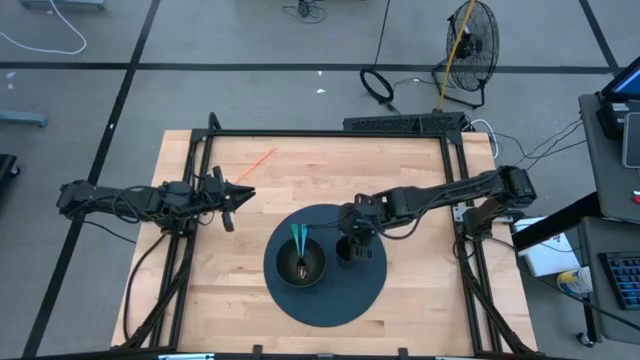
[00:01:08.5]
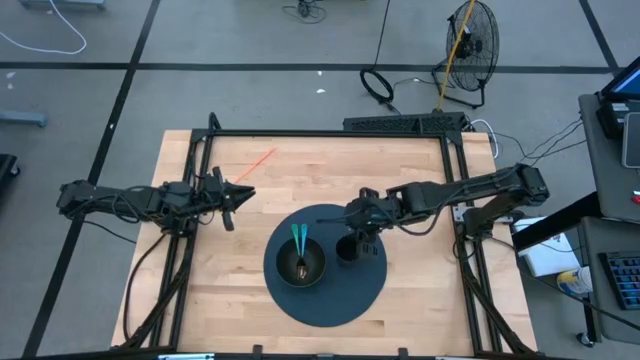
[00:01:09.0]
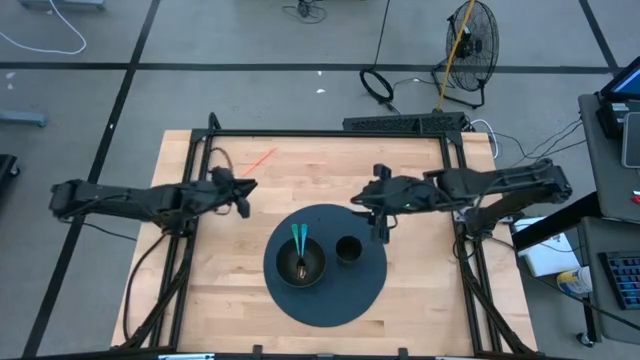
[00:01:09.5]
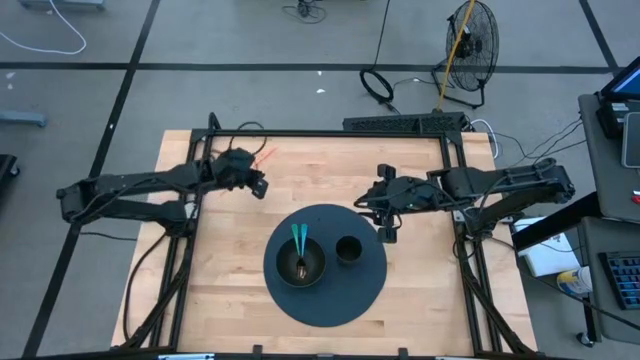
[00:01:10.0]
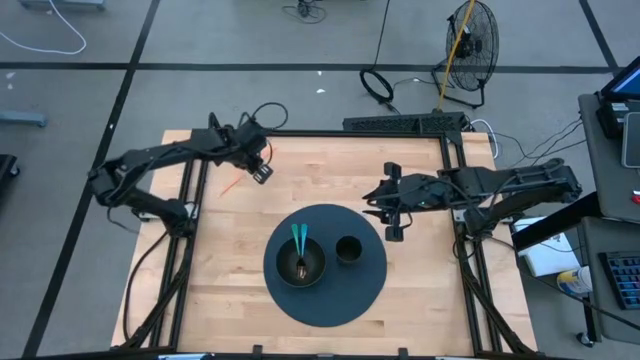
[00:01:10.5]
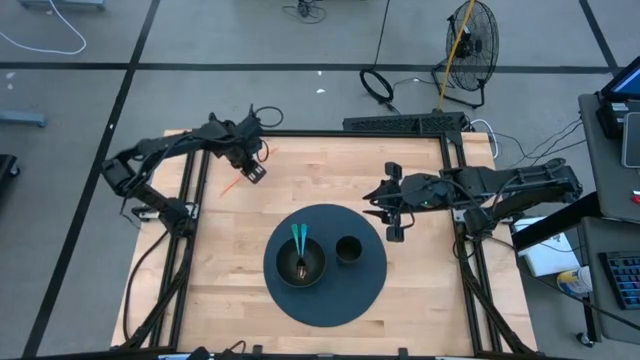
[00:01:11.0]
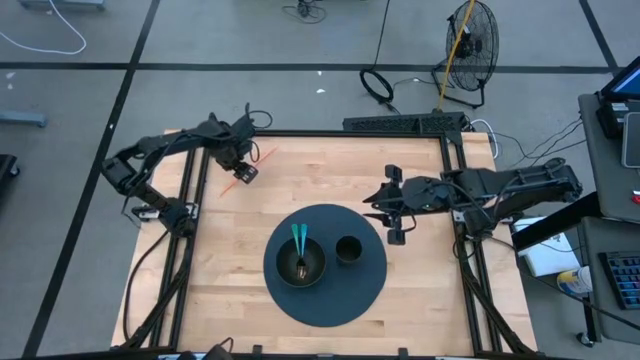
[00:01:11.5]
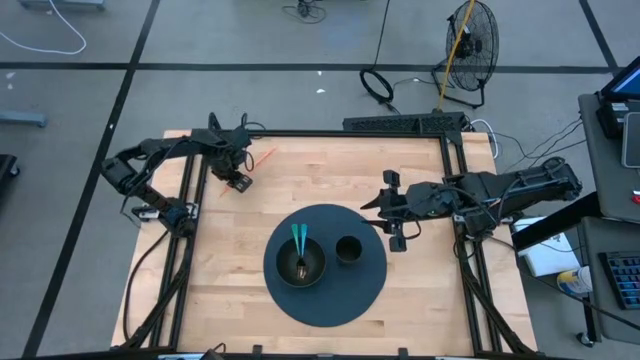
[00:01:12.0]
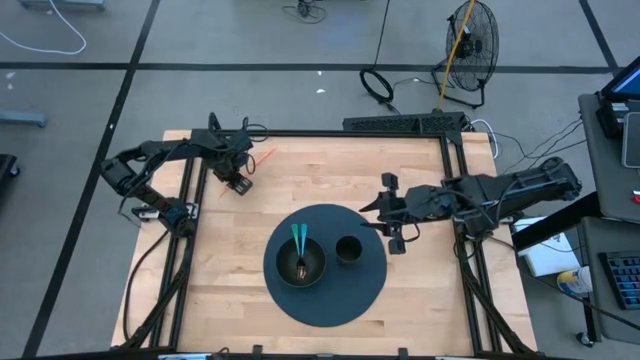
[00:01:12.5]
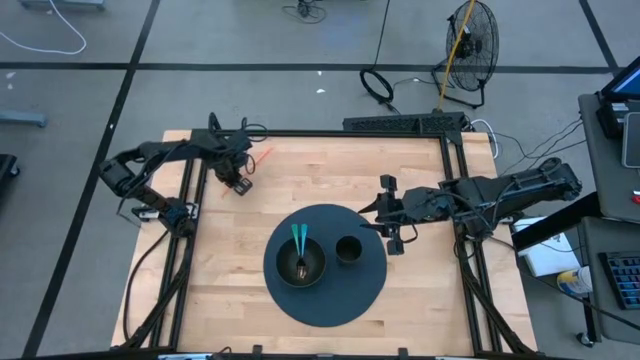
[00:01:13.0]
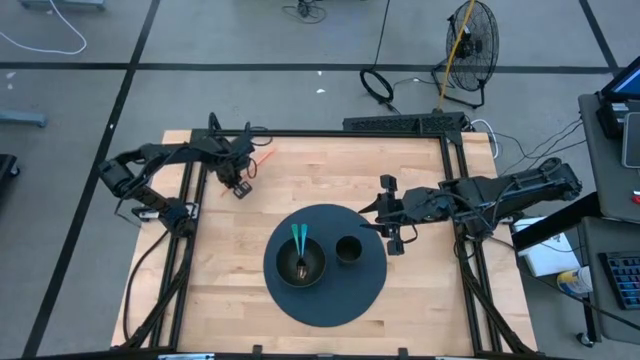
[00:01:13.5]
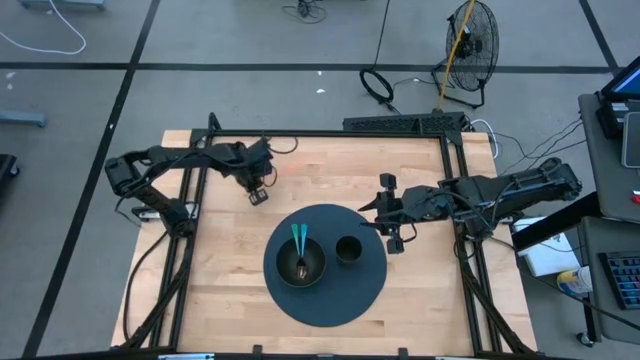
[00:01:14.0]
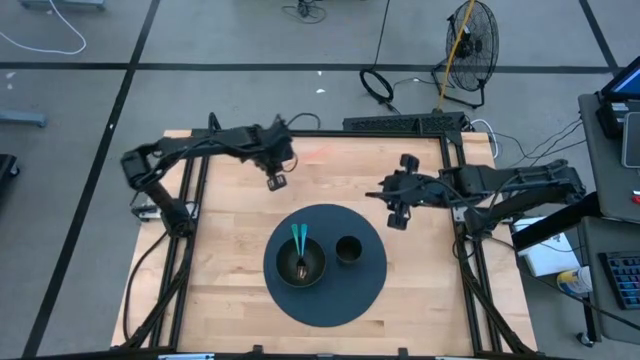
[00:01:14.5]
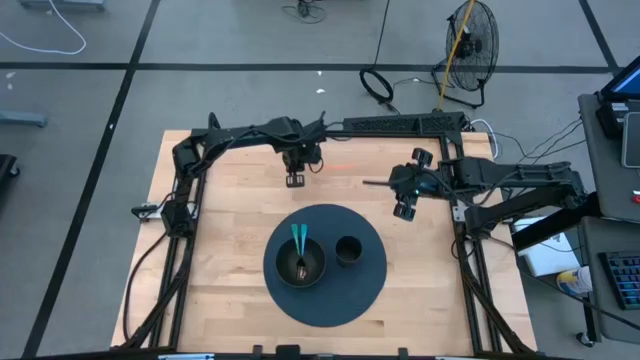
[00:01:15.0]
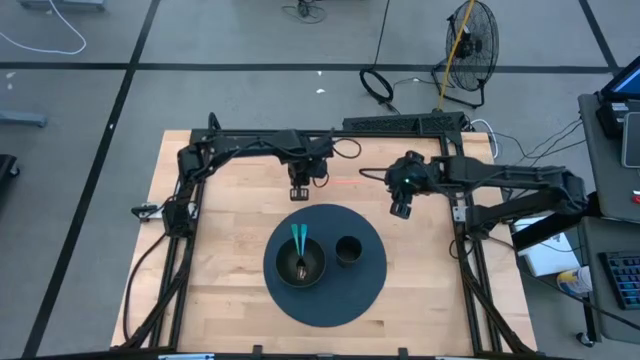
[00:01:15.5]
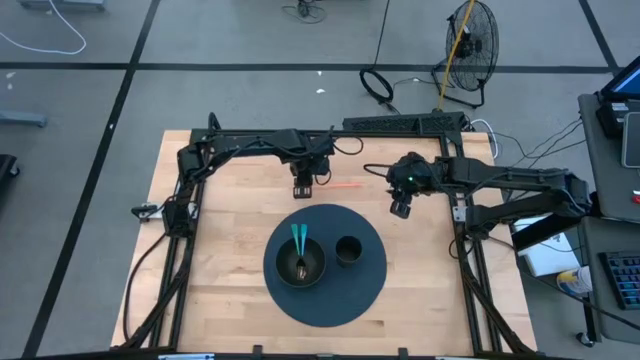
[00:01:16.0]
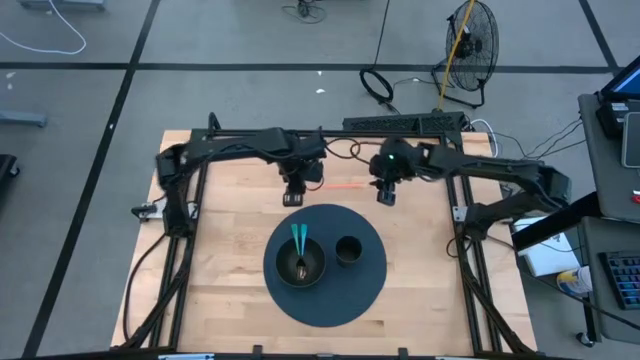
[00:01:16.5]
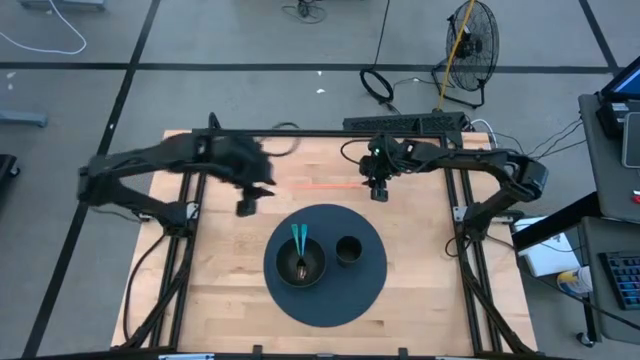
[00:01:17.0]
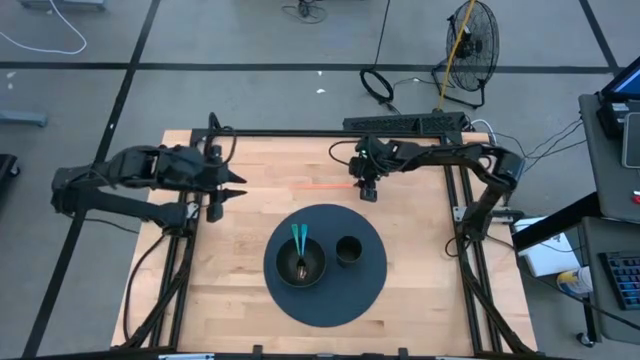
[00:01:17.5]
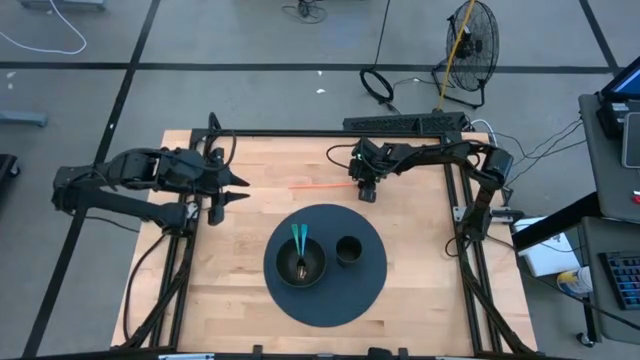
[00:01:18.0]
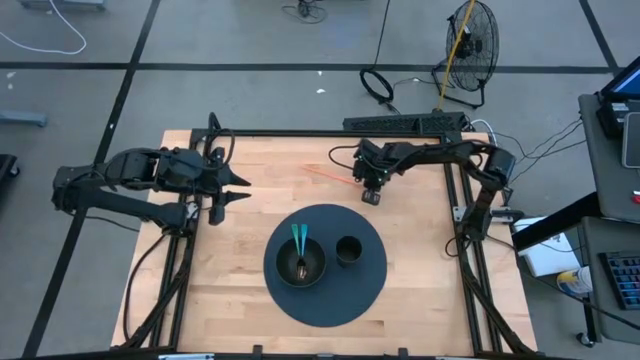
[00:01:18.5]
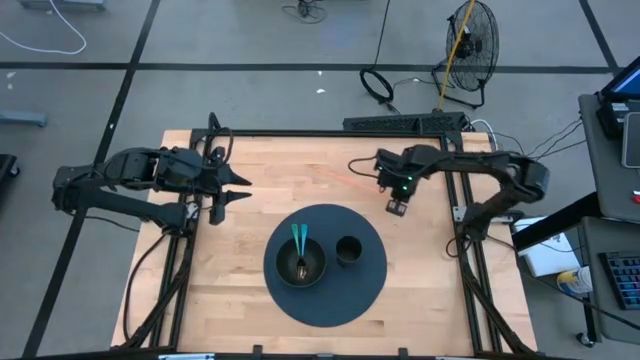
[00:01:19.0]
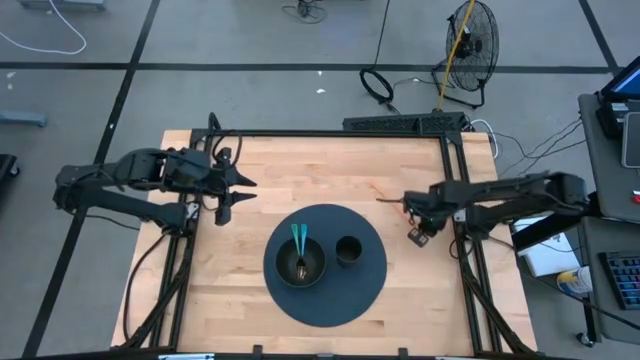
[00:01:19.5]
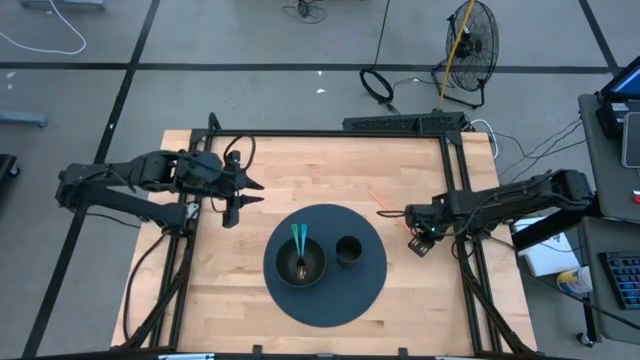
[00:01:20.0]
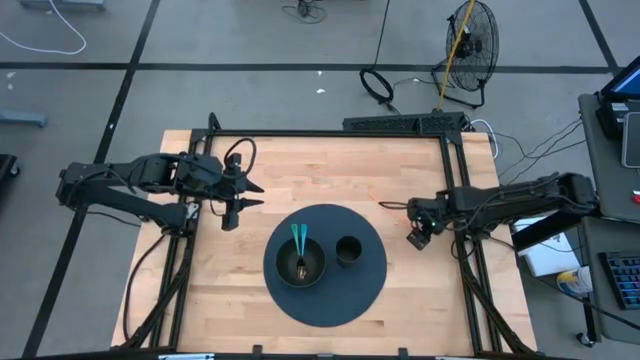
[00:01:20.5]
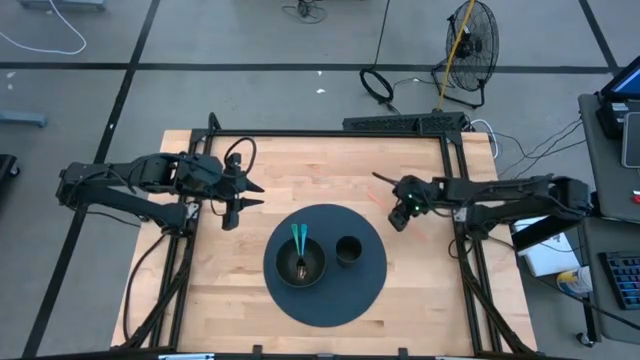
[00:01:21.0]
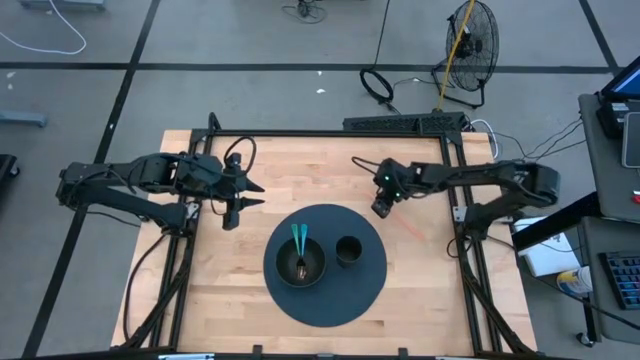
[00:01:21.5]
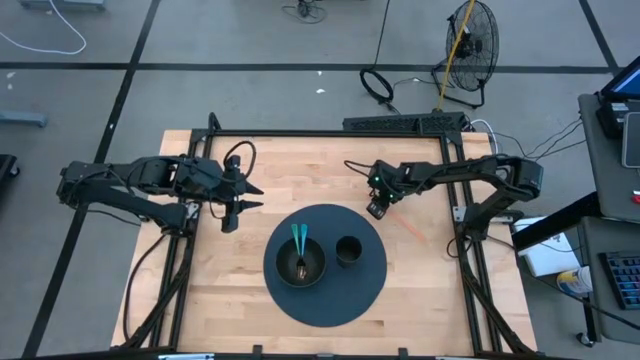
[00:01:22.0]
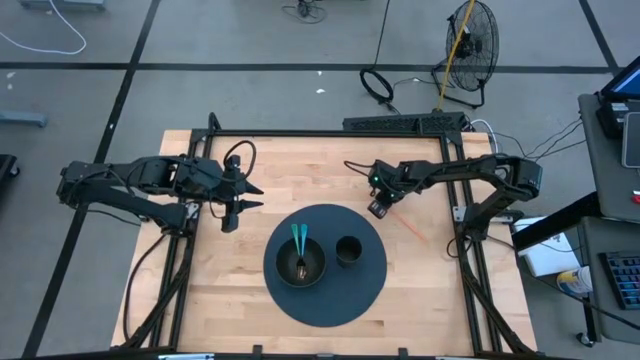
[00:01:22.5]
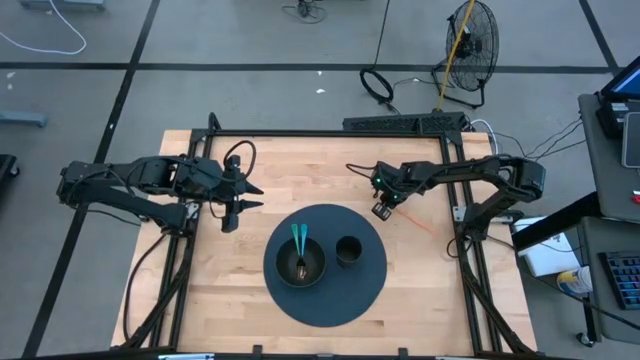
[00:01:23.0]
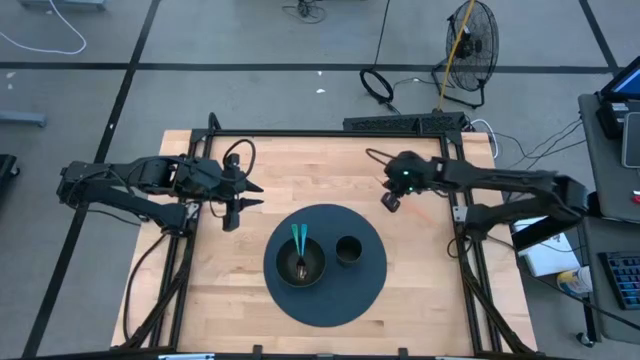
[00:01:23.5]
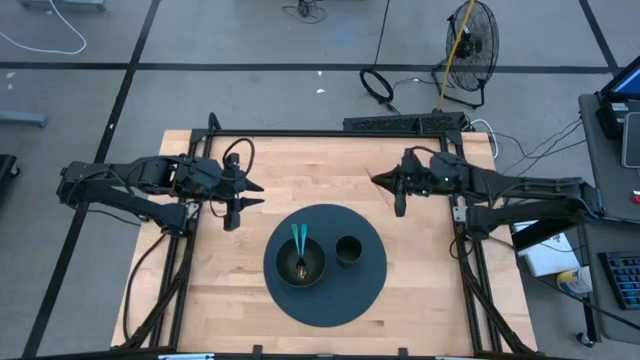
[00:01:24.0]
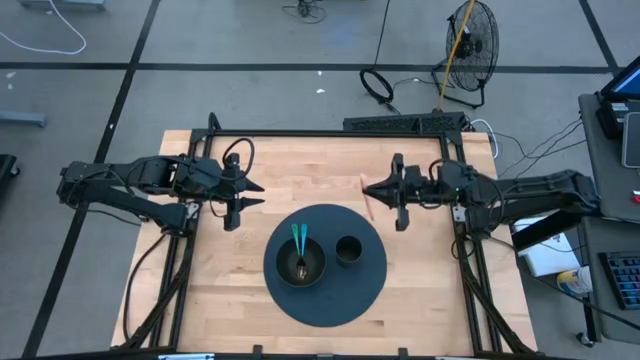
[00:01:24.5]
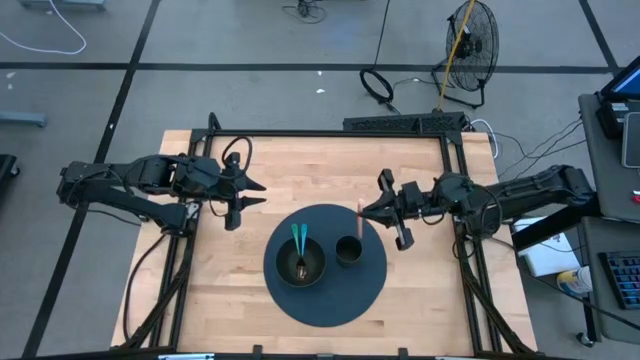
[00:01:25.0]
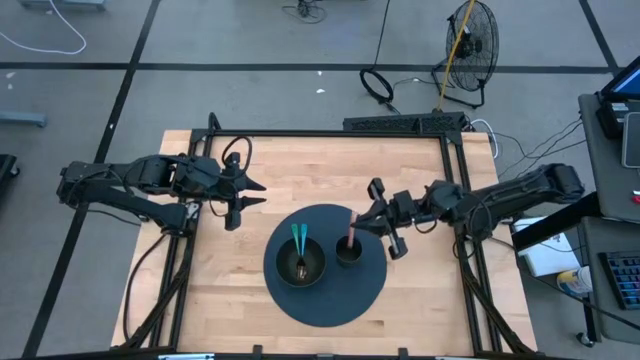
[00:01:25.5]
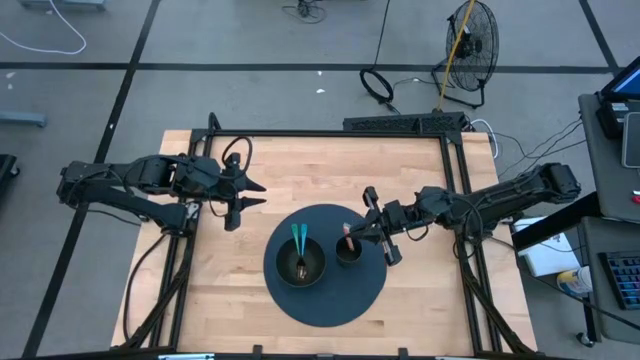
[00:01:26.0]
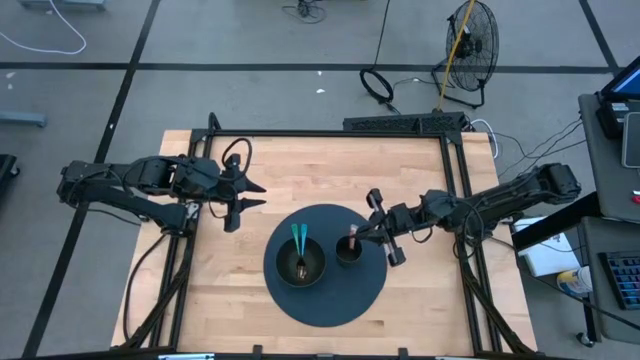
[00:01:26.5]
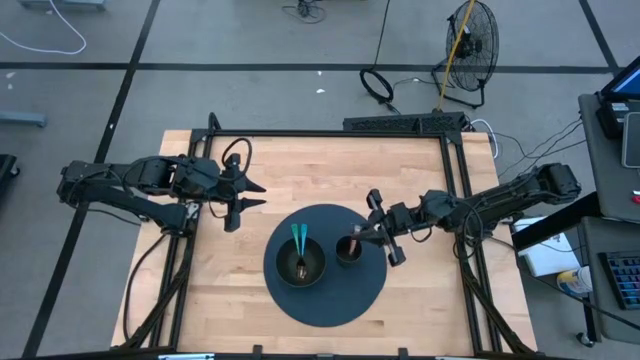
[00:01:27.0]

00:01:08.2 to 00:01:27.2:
Task: Pick & Place Utensil
Put the orange straw into the black cup
